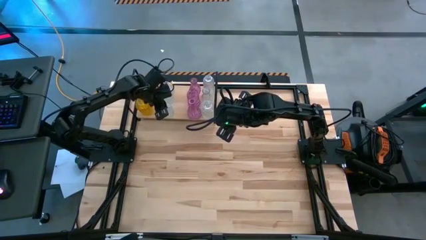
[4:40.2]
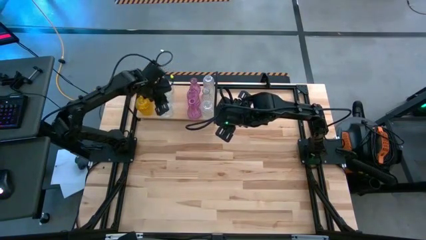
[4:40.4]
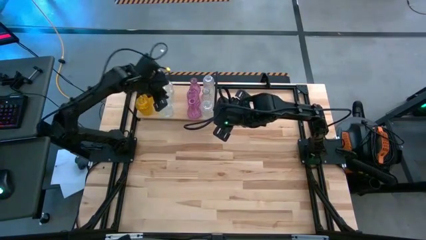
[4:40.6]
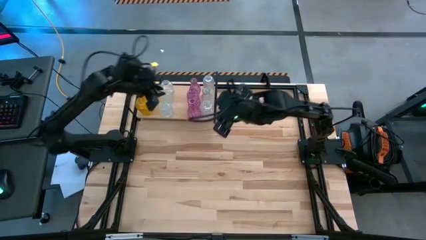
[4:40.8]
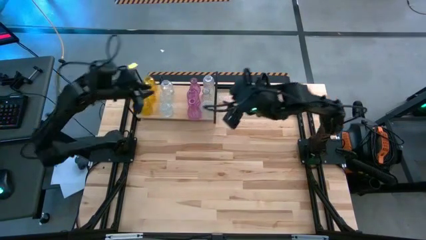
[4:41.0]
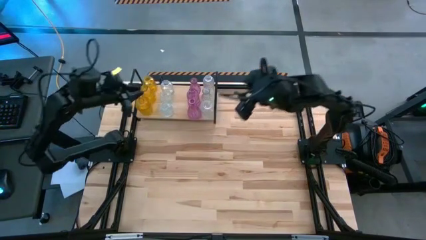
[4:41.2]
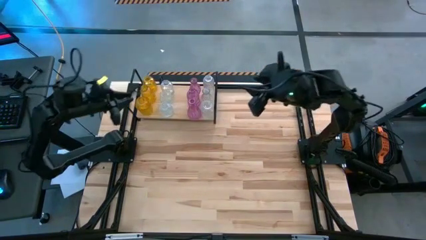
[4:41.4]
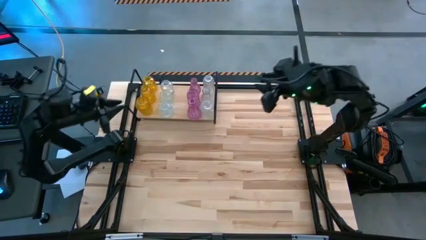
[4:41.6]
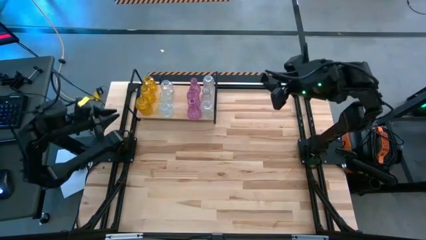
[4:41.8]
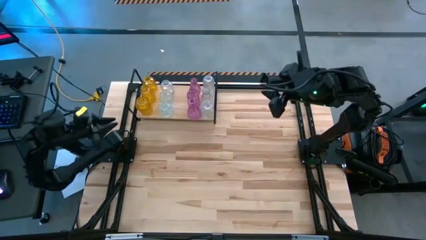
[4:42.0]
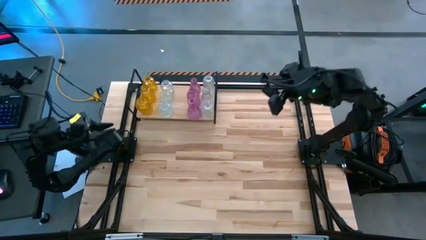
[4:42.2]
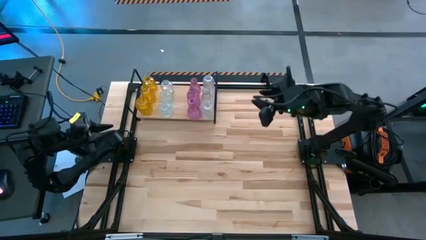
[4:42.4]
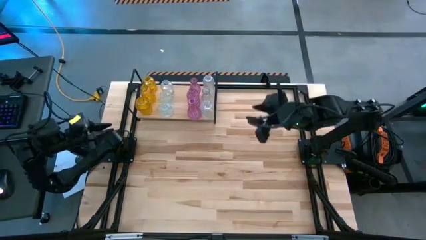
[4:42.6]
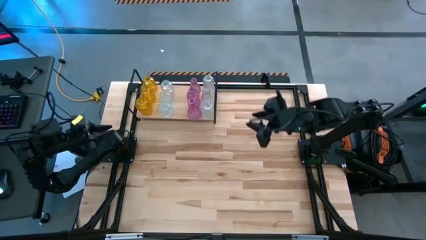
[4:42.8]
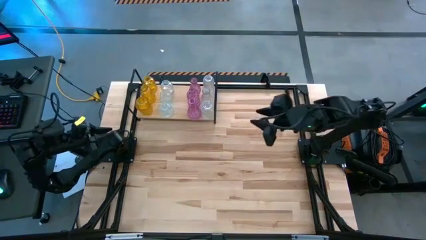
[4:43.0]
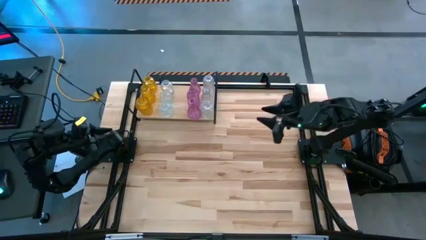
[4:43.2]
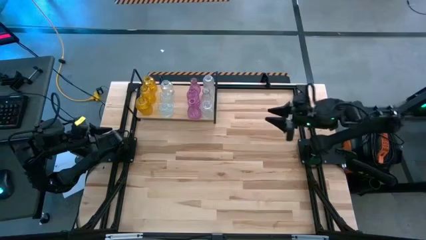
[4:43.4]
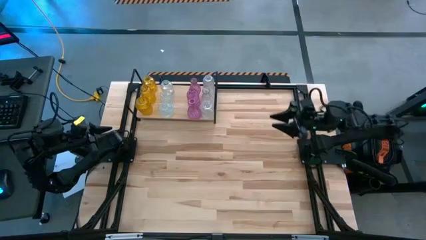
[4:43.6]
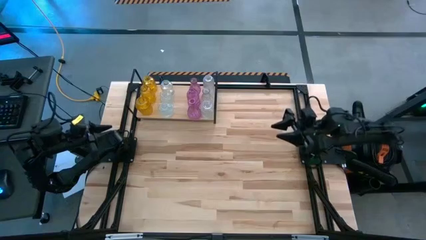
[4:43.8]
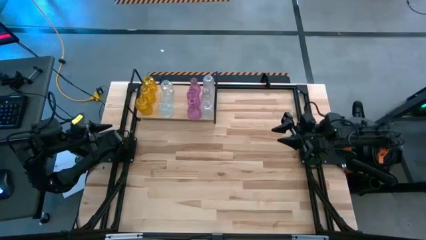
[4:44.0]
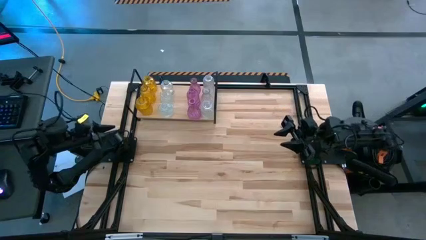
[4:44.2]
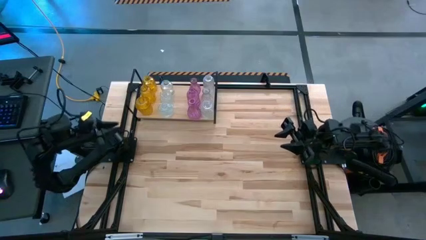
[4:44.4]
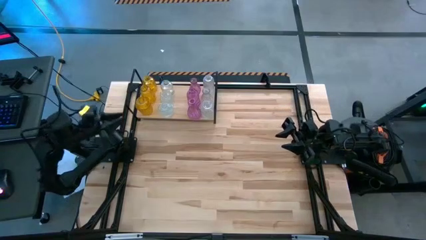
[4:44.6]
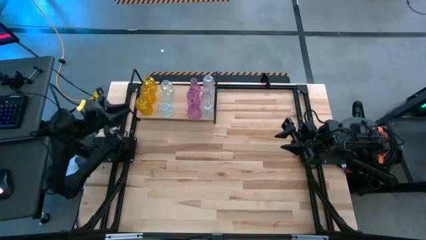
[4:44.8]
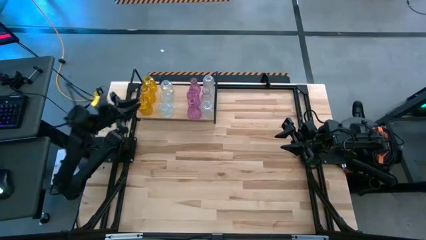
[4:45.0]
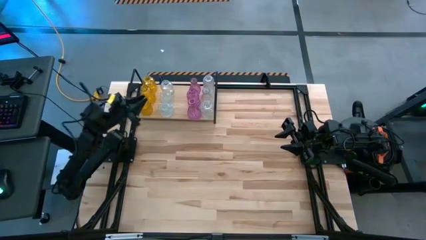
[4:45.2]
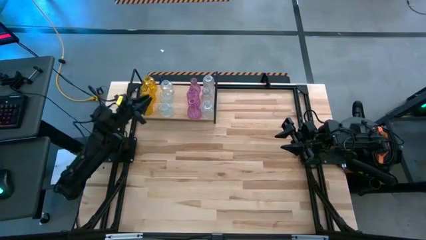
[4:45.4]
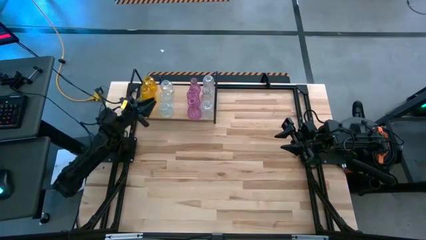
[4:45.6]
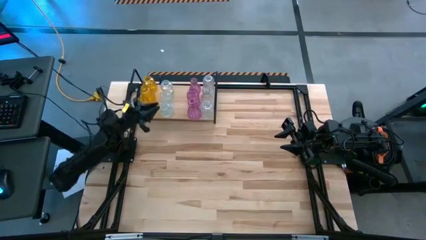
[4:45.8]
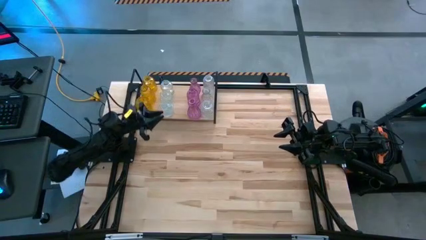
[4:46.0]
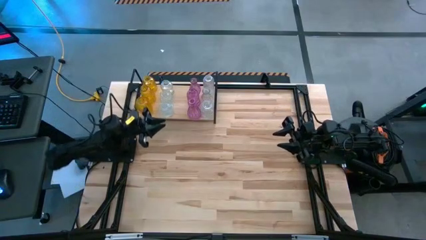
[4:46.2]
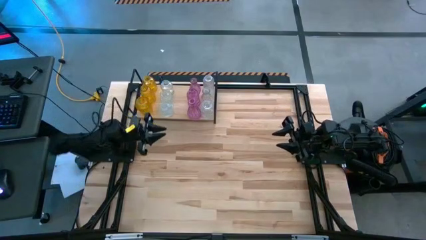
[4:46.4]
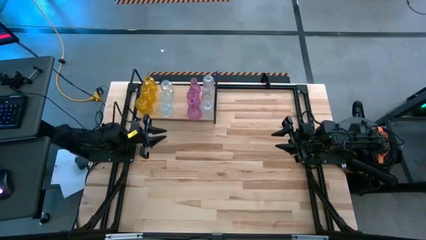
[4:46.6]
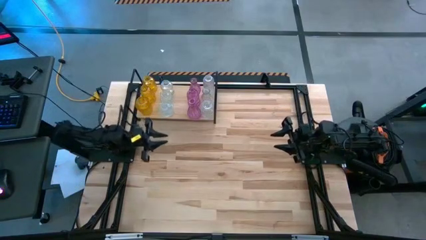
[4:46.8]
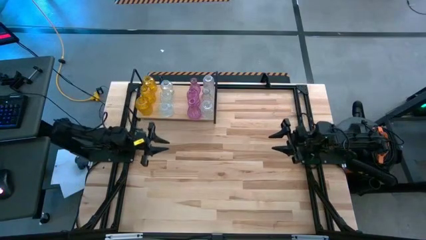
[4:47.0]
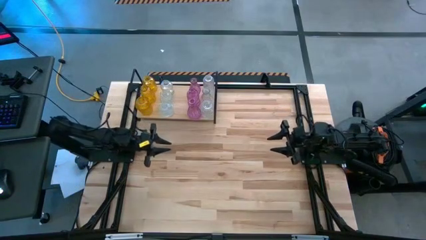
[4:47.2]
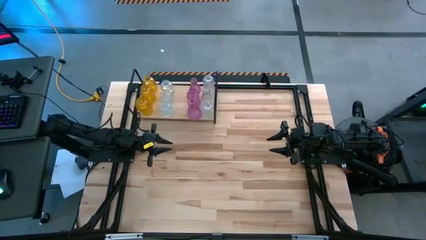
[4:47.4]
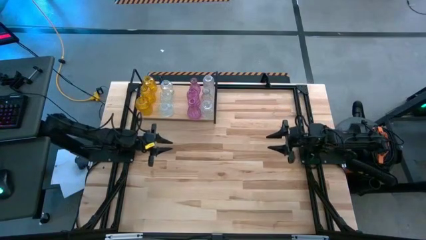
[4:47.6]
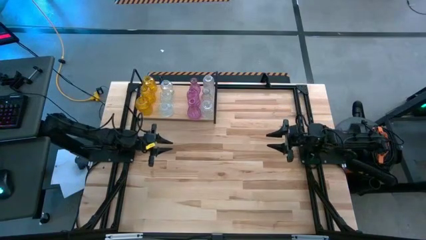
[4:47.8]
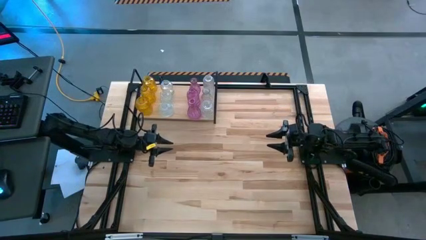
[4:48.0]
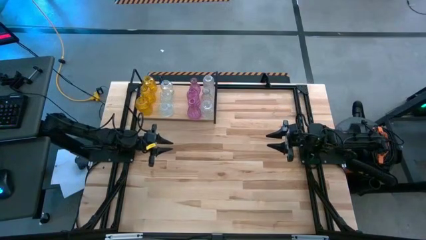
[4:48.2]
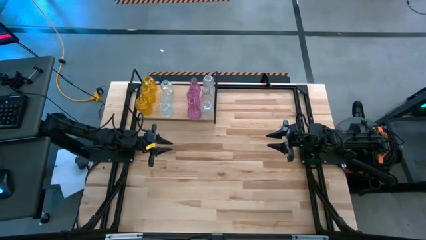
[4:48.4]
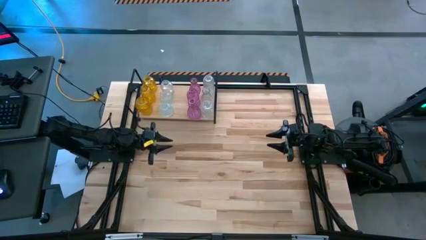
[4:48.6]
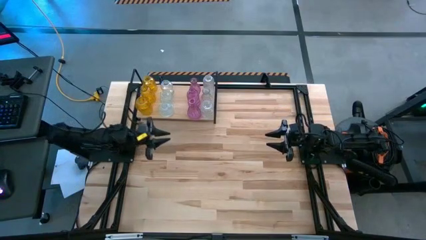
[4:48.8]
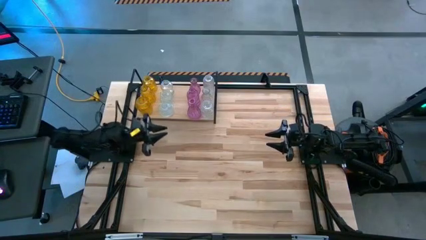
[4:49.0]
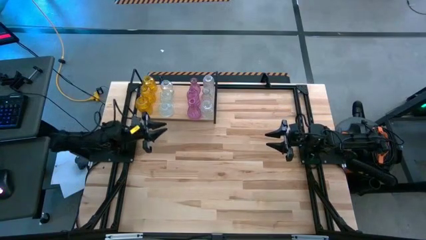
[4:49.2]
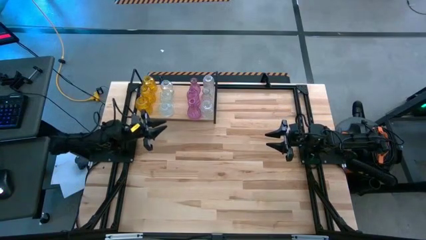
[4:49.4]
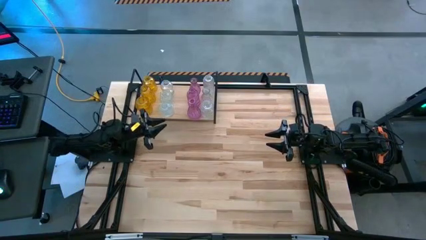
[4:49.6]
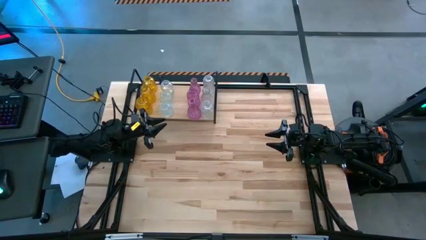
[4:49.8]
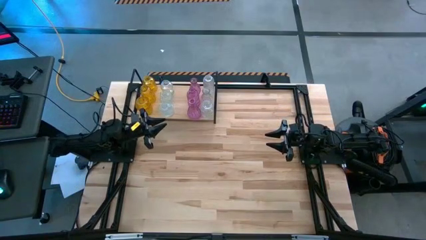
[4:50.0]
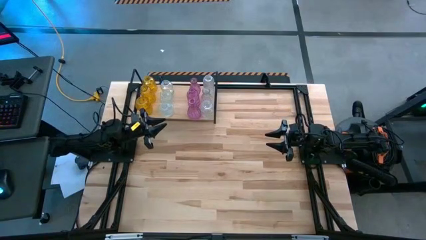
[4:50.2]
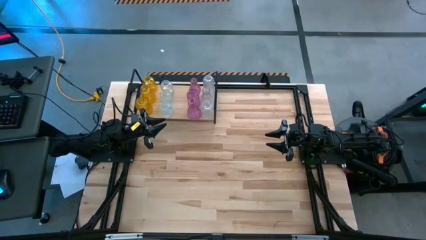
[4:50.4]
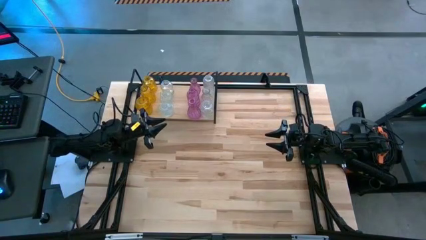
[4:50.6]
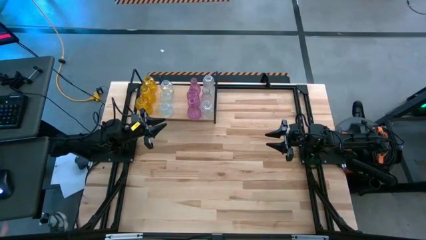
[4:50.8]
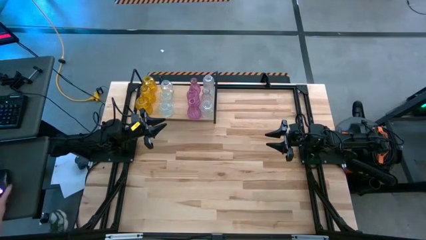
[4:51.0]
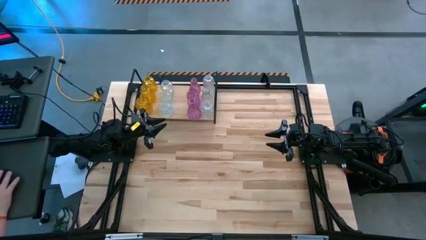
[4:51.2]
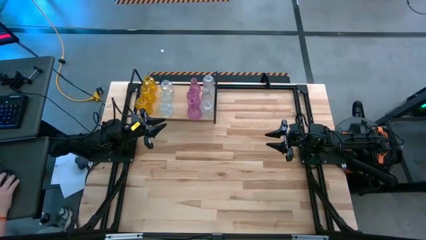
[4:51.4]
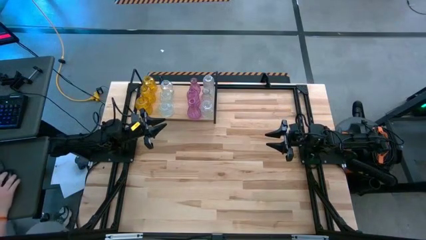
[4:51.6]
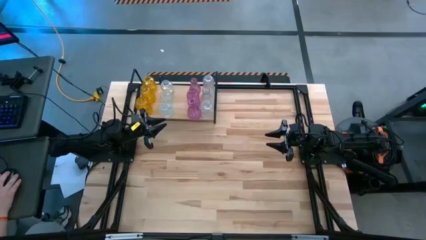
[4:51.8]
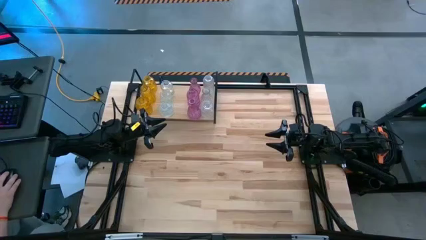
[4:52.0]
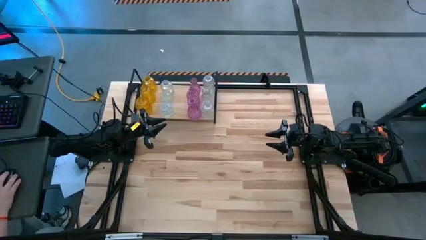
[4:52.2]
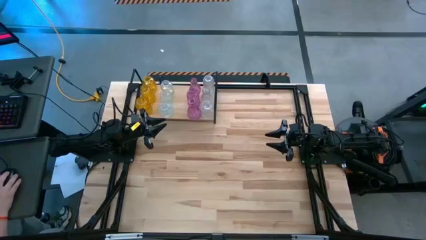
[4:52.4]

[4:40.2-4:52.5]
Task: sort vases onto shelf
Return to Home Position

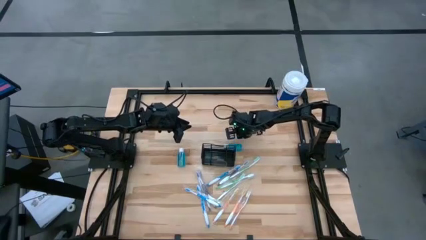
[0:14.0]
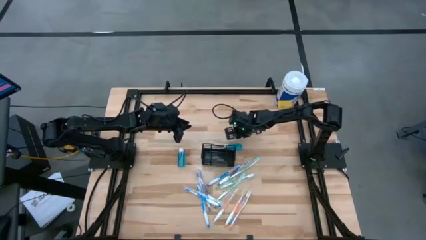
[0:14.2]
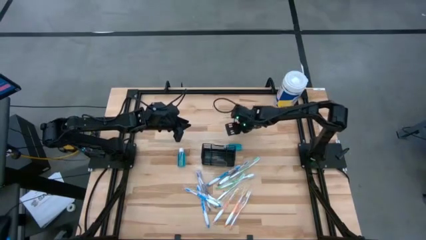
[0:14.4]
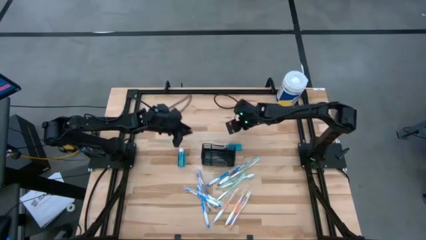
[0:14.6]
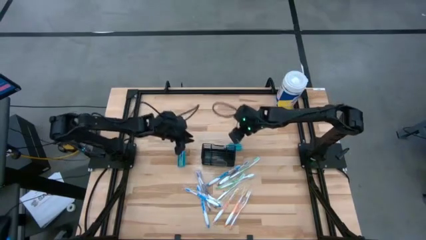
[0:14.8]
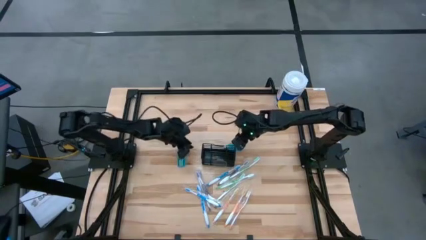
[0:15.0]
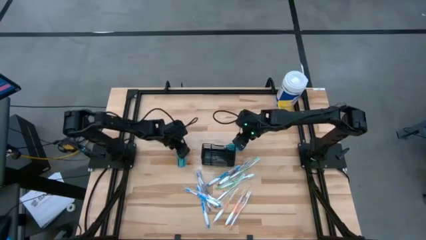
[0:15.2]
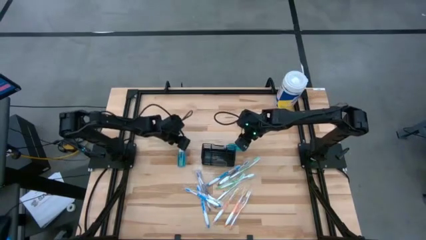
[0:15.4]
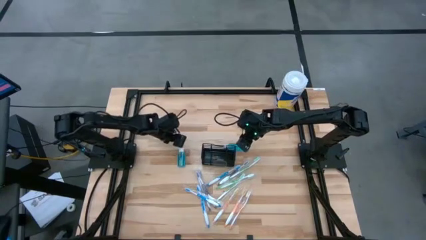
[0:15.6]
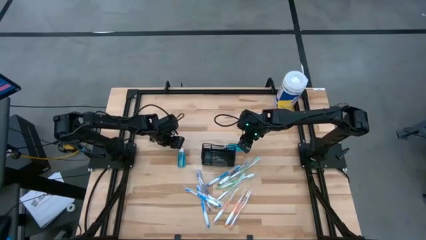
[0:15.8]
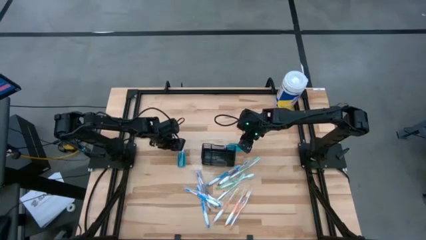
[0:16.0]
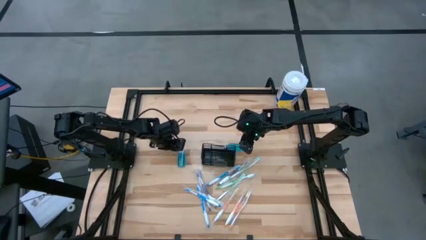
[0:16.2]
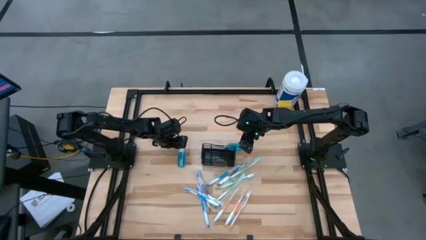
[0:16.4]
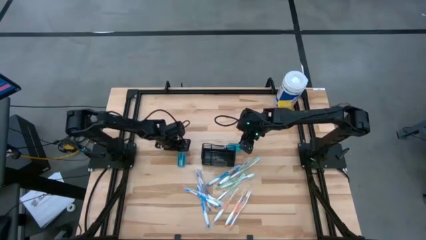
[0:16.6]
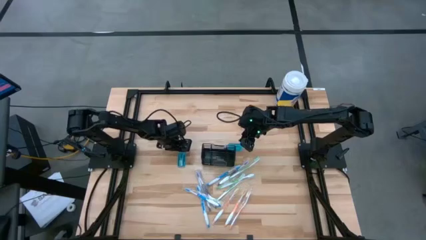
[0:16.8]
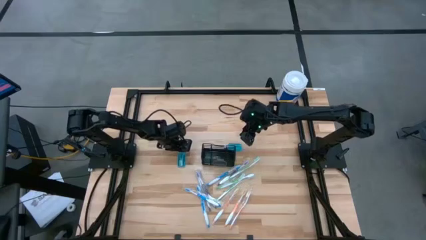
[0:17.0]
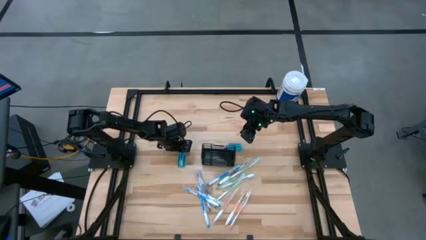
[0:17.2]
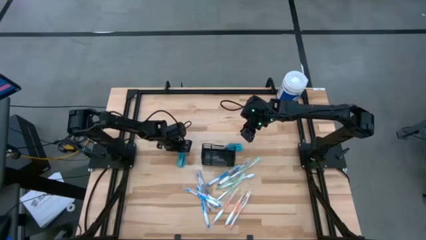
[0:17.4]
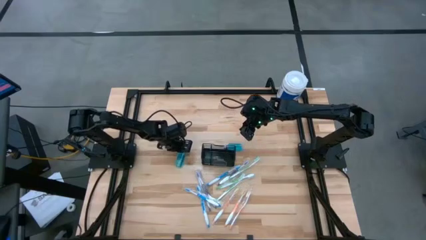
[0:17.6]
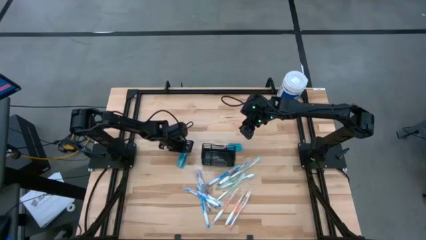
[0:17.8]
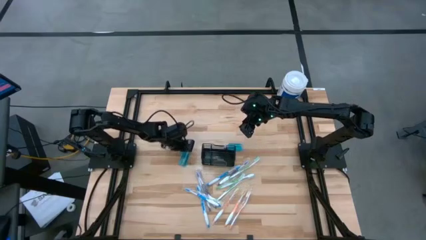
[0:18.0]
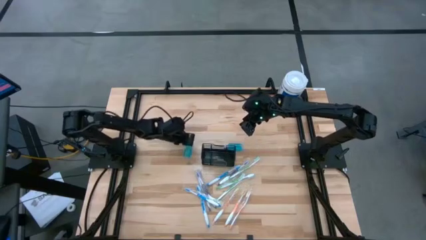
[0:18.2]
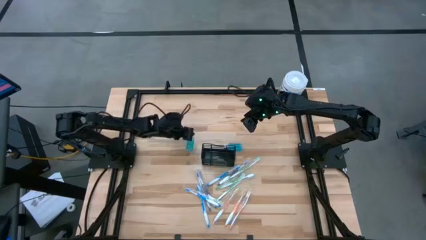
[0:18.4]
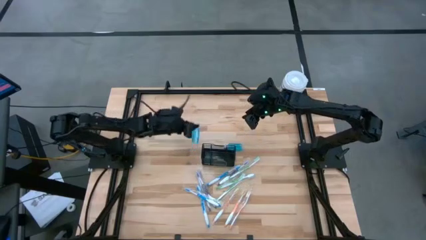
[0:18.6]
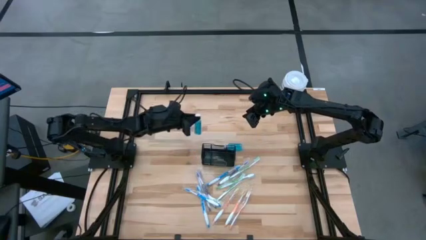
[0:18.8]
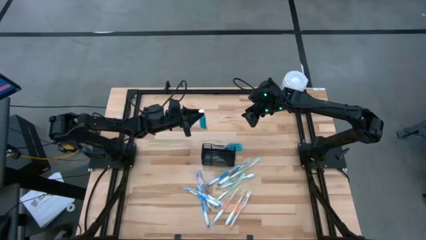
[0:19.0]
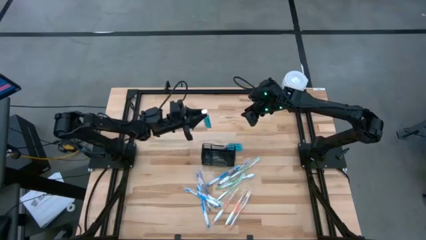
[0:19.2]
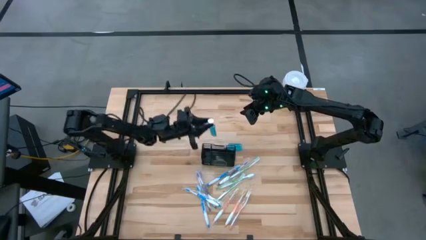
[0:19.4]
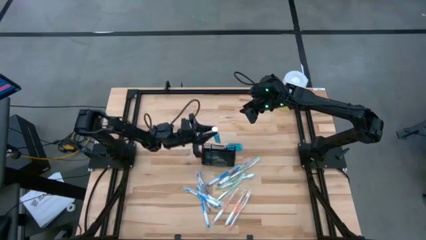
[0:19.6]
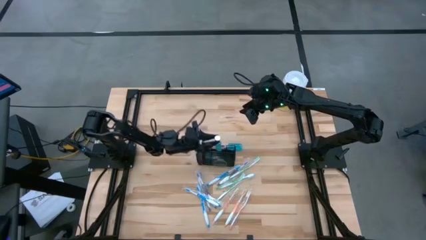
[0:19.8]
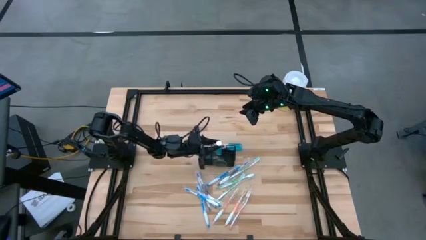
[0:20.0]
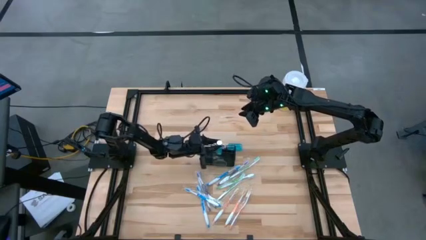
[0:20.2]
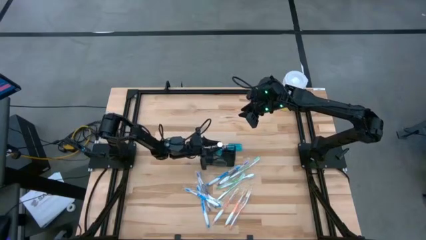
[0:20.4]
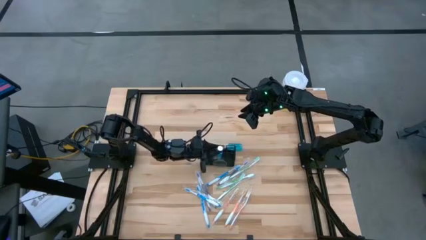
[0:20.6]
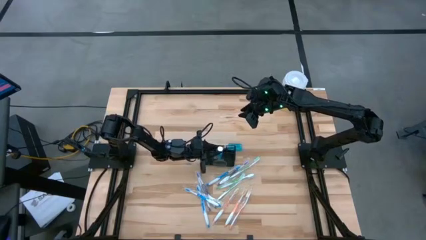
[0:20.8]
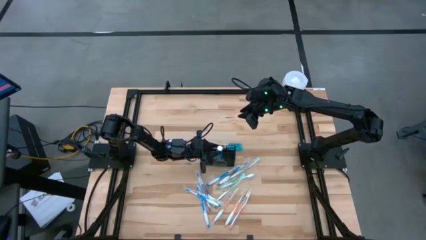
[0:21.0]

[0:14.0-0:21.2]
Task: Pick & Place toothbrushing station
Put the blue mouthwash into the black wire organizer
